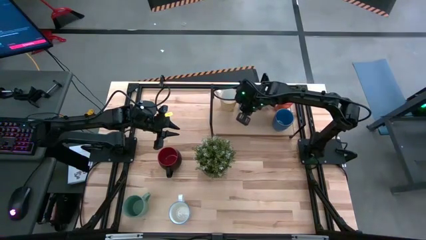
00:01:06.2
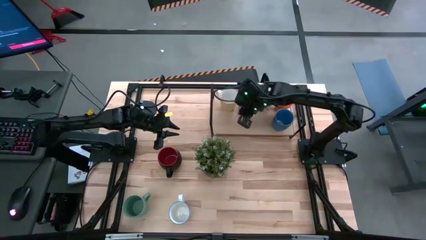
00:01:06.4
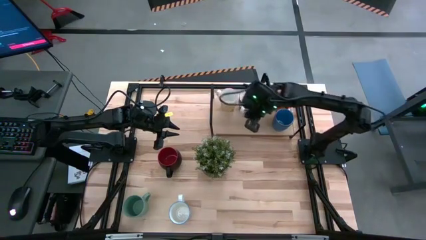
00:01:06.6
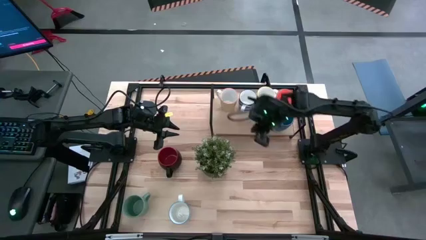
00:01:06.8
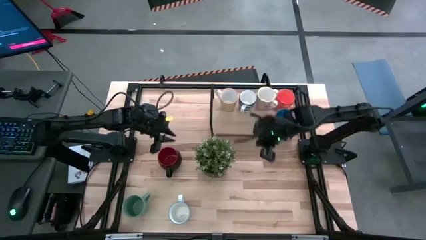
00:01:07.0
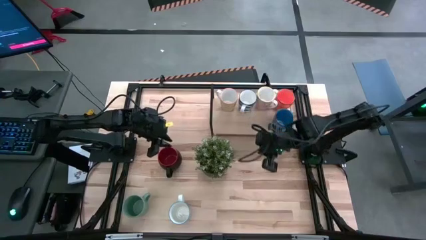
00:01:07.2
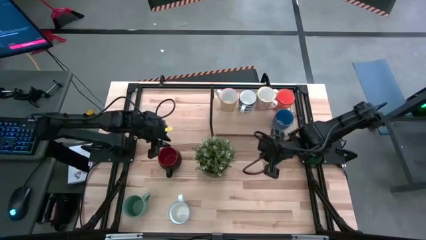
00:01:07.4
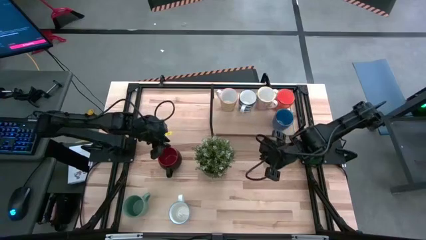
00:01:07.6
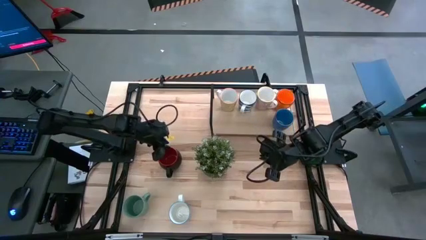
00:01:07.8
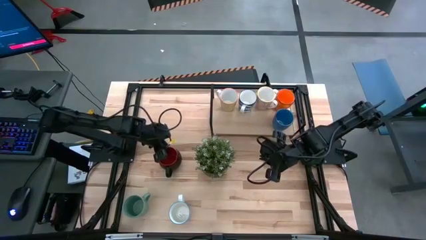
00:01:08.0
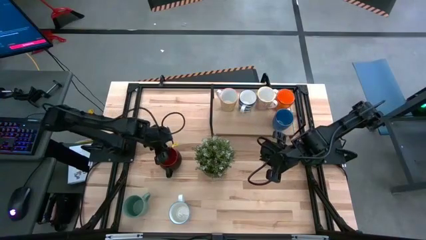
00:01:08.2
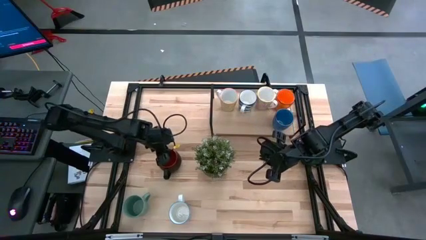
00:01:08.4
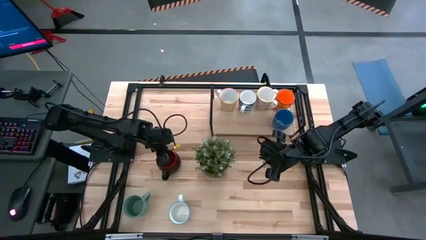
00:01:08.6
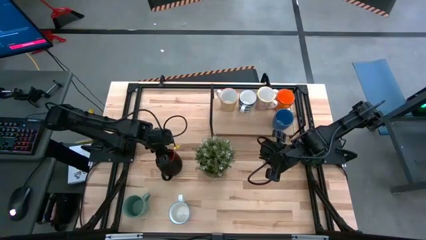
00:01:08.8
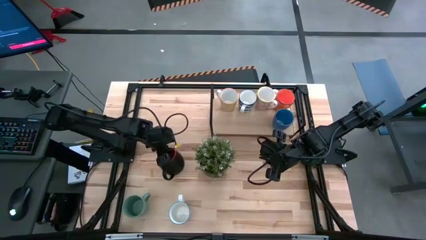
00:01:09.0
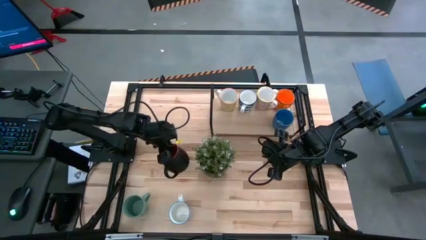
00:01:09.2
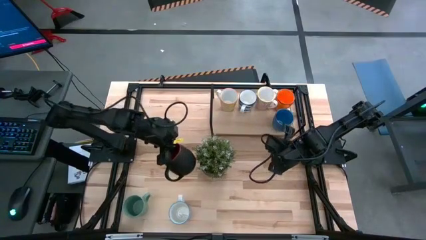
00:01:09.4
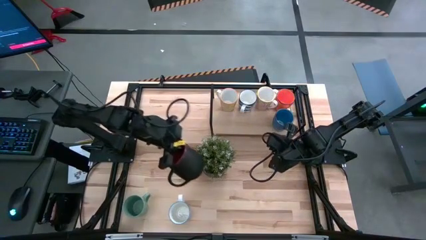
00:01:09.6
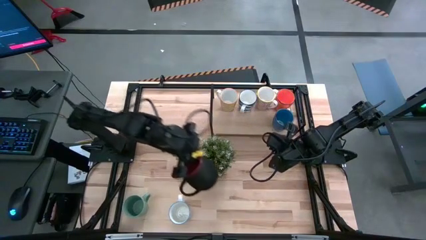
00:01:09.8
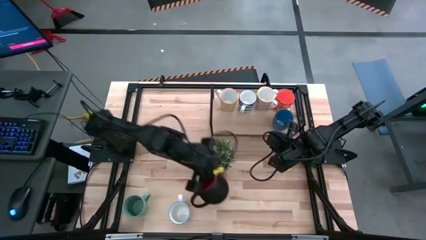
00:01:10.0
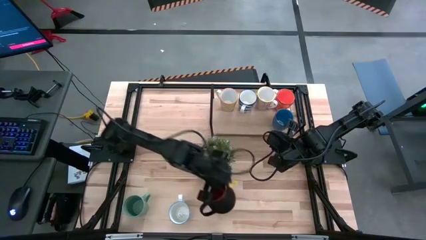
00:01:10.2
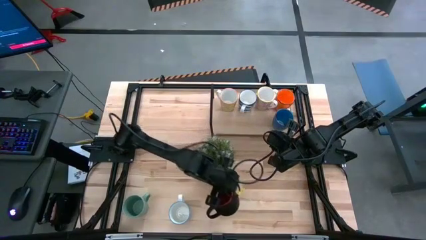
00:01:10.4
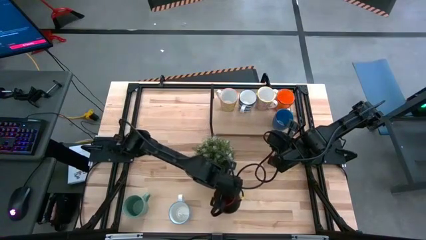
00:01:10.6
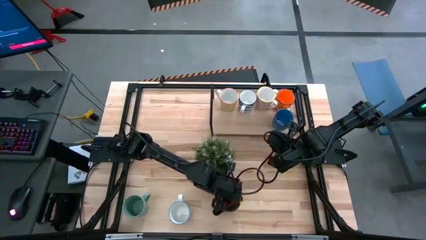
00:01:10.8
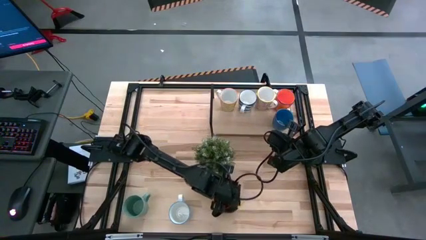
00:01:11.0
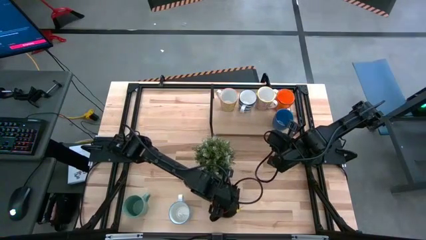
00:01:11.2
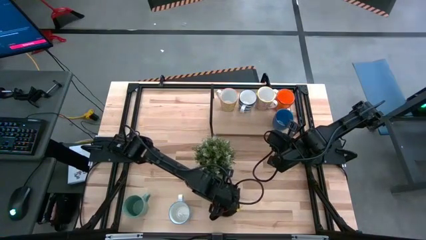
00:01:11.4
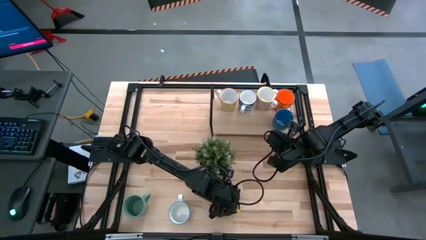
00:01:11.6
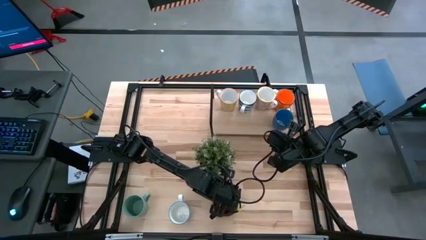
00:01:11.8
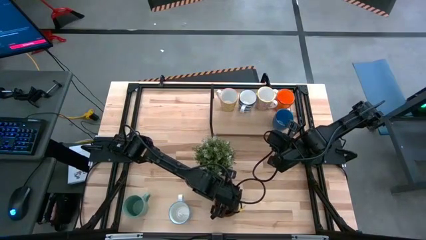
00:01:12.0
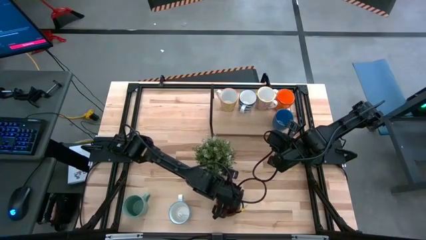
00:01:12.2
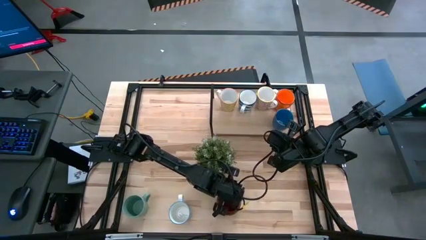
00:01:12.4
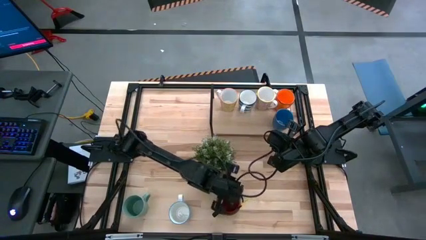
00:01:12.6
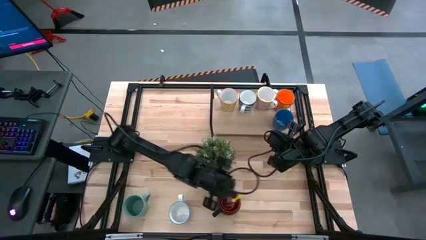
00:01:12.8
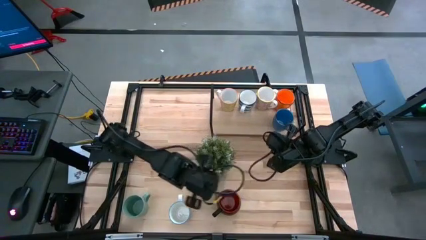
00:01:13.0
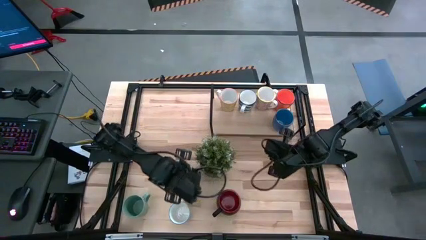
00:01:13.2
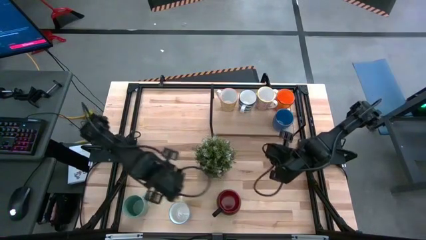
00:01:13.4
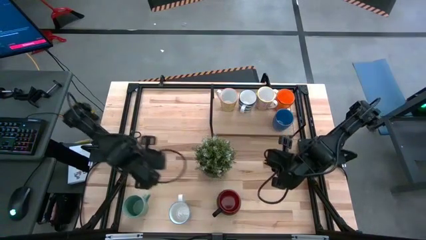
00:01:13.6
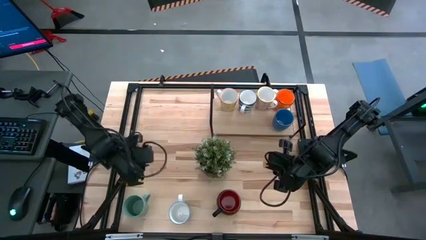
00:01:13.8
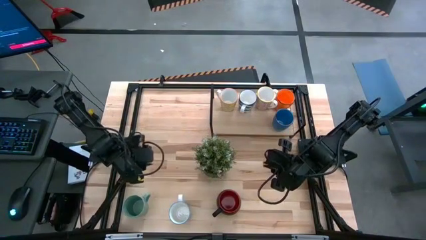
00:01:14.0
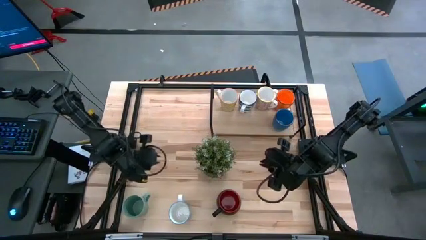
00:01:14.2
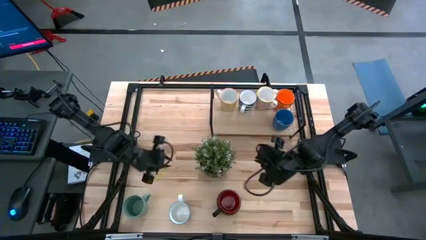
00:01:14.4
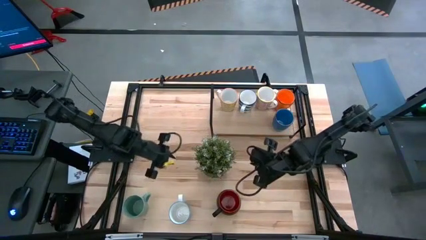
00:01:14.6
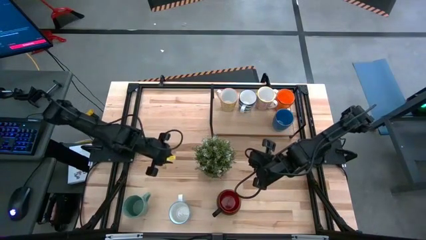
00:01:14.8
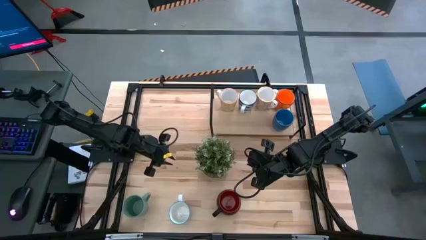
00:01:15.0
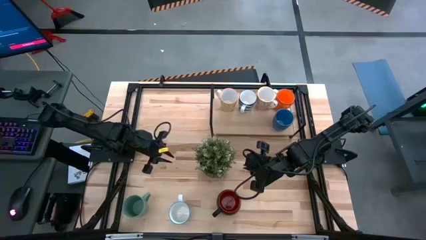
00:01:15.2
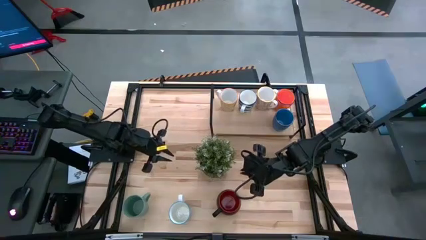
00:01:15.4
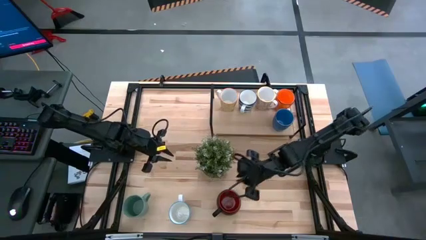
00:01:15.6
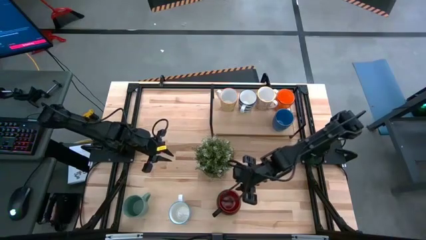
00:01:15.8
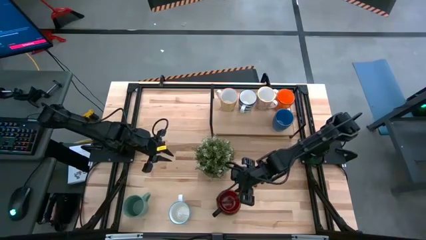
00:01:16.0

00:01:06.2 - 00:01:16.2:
Task: Place coffee mugs
Put the black mug on the shelf

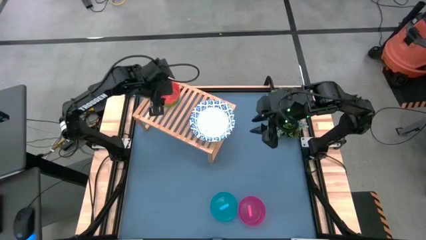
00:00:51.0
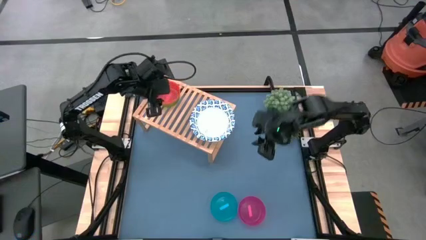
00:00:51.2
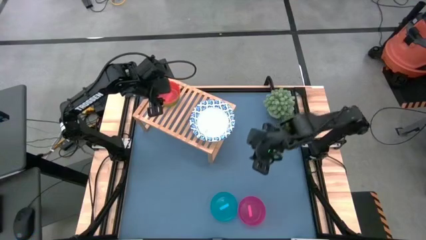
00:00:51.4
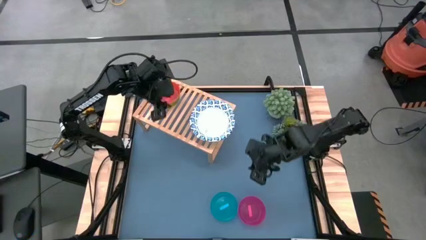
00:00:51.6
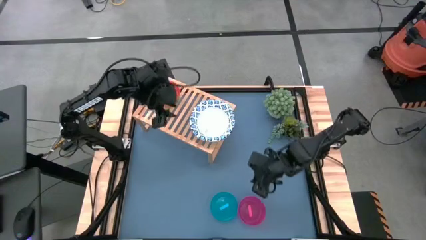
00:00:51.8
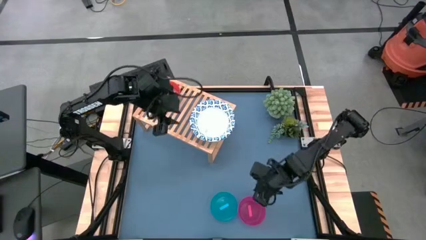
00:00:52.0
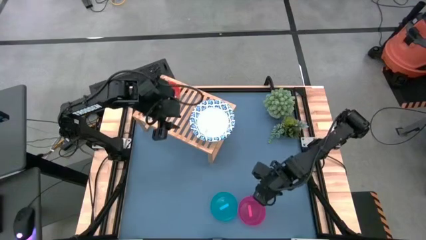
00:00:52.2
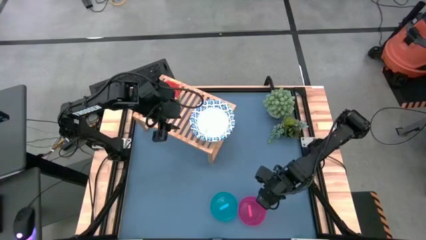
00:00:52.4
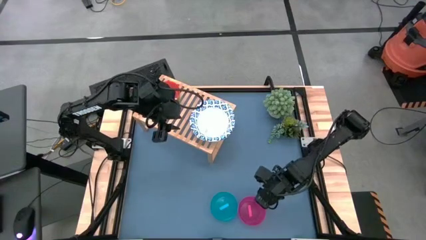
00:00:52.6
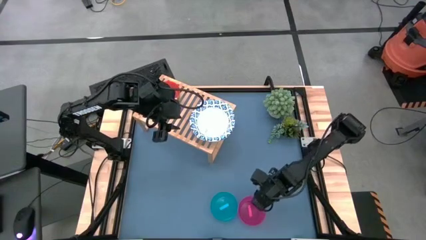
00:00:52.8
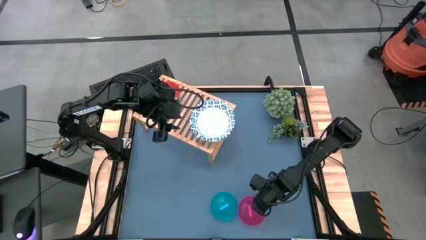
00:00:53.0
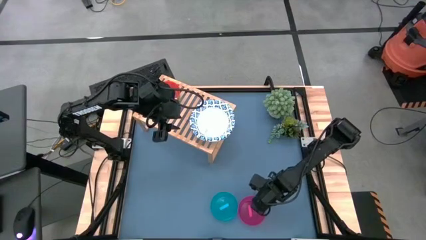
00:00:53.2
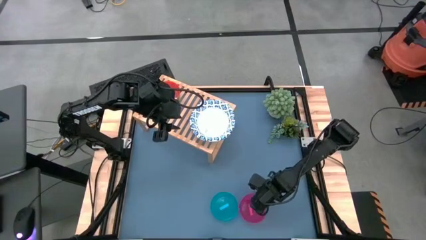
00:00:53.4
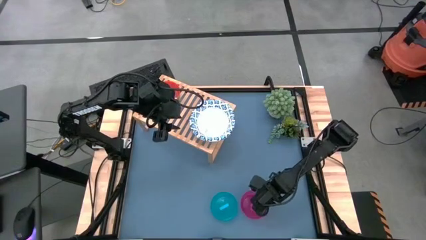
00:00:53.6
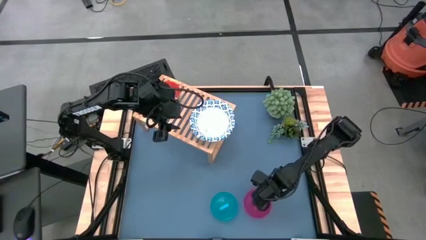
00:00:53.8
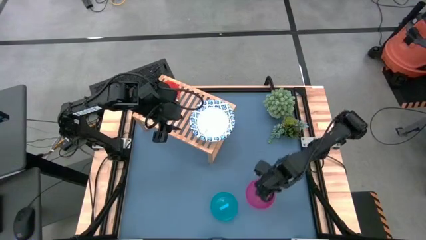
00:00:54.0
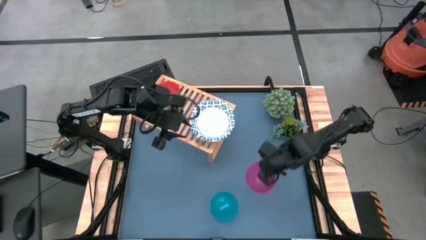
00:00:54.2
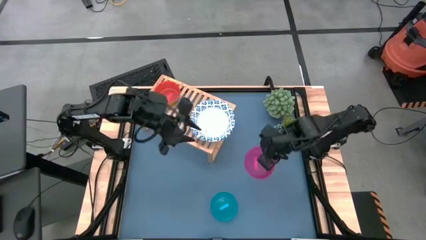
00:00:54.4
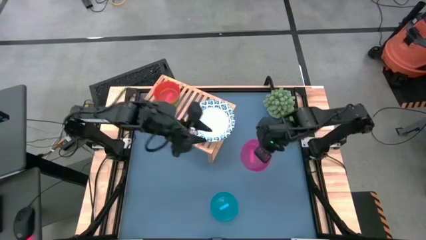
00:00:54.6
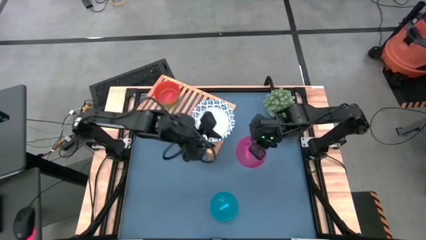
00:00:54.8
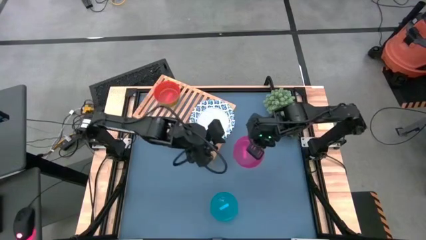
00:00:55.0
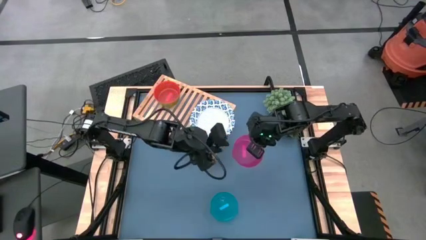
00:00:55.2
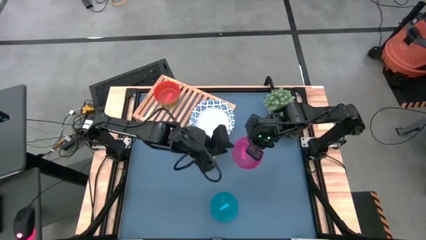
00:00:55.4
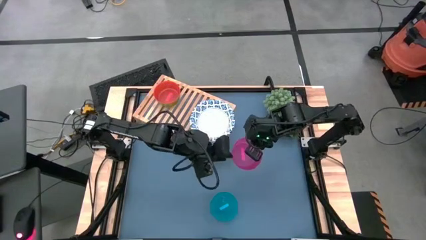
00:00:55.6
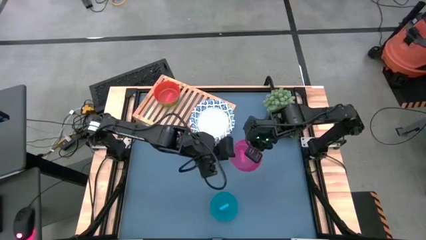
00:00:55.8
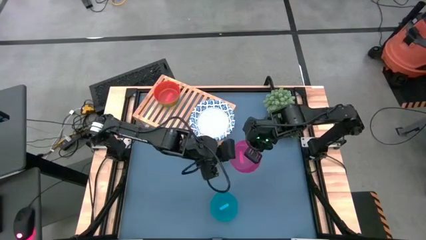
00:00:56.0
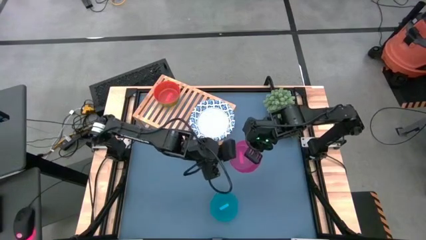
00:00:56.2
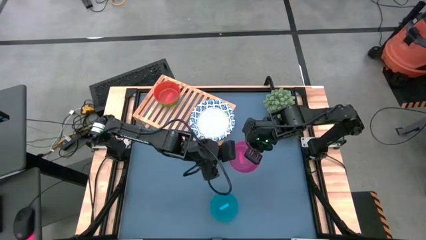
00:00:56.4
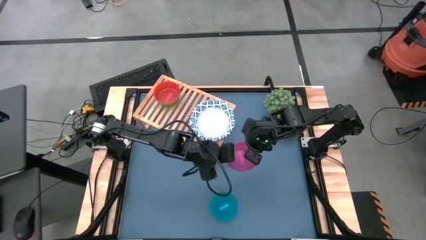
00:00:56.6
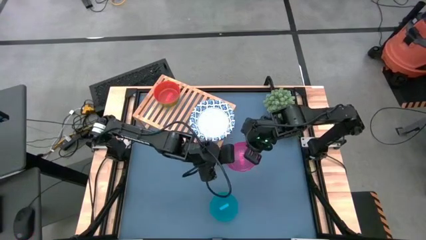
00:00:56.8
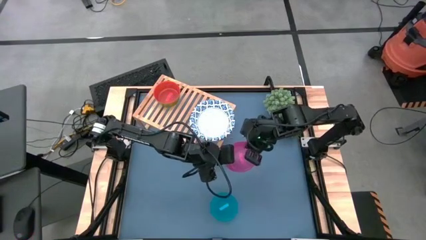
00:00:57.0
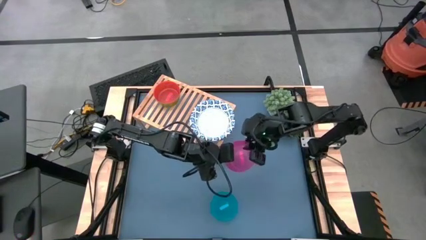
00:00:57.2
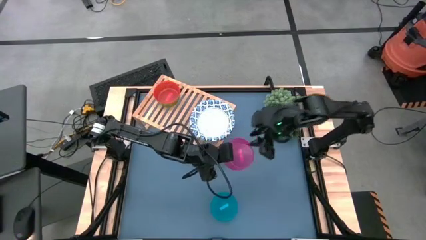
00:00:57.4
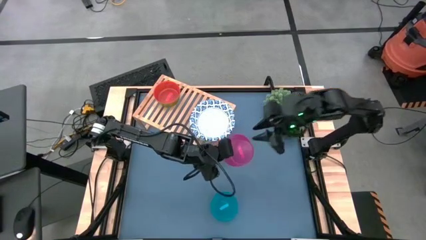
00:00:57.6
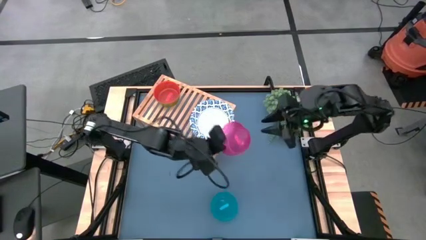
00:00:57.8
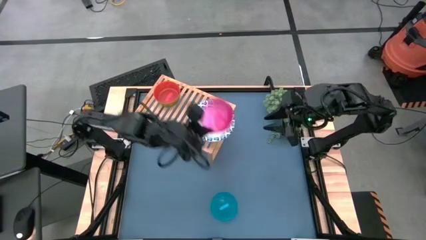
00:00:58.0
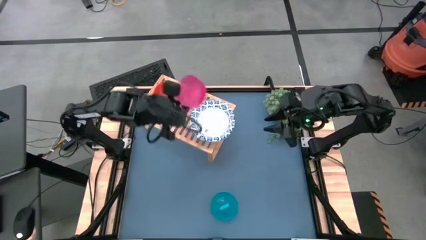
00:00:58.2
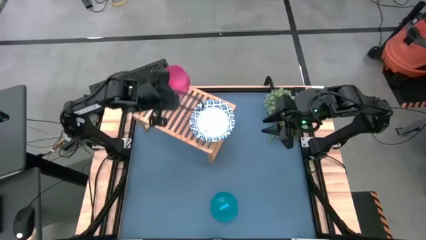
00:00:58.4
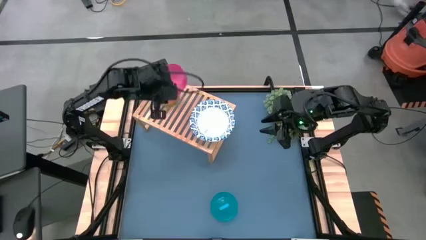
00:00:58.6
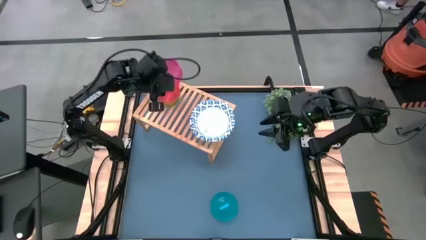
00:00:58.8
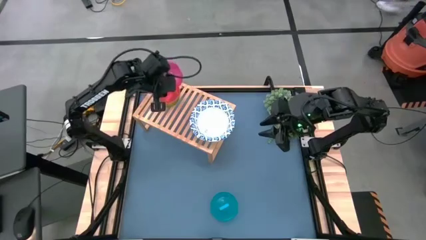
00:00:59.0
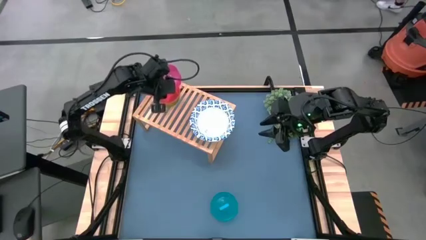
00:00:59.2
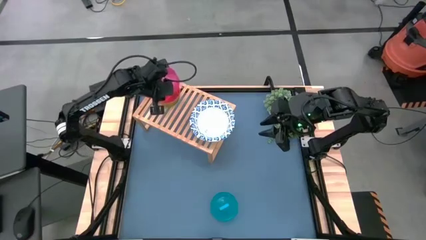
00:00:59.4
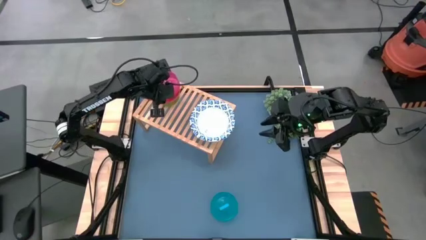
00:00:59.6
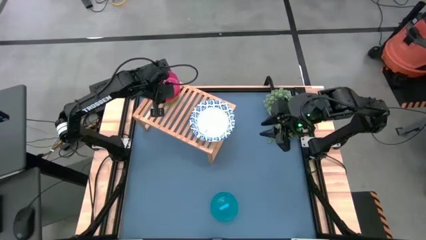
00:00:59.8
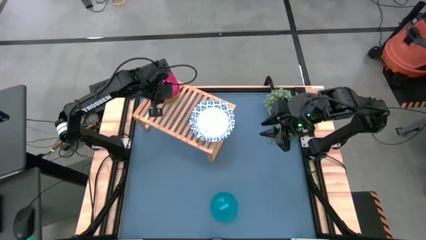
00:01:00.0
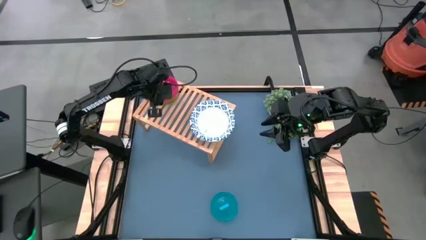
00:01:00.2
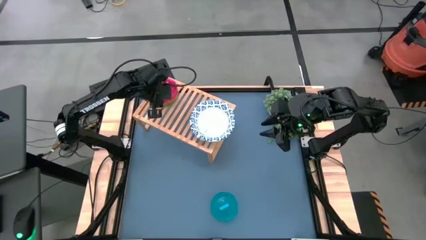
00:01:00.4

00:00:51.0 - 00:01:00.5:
Task: Place and stack bowls onto a shelf
Stack the pink bowl on top of the orange bowl on the shelf
